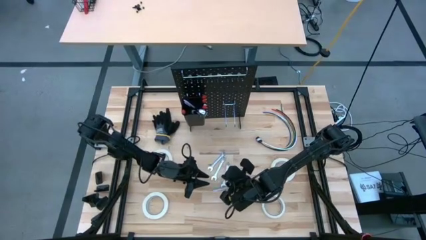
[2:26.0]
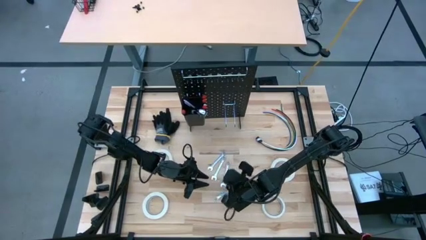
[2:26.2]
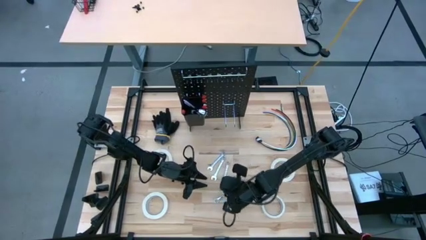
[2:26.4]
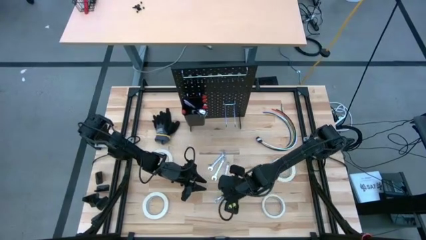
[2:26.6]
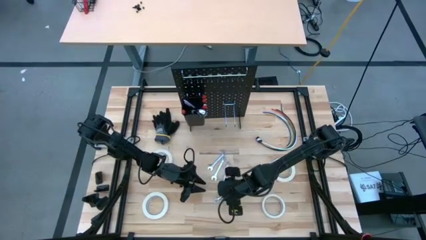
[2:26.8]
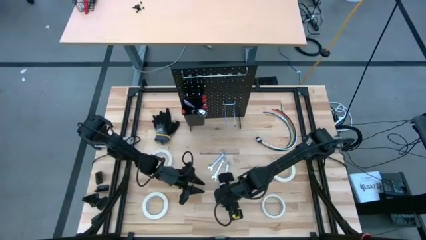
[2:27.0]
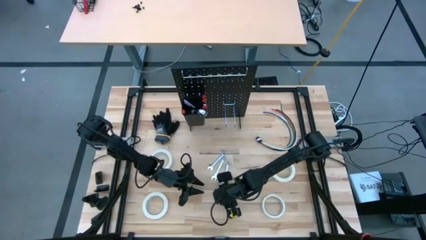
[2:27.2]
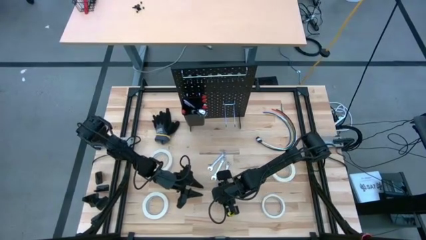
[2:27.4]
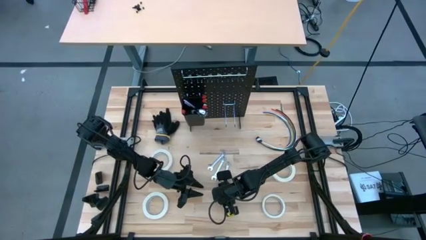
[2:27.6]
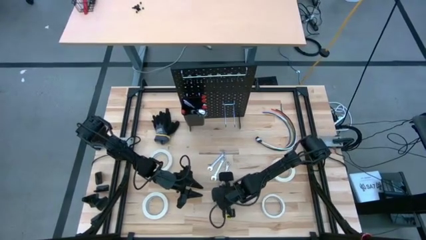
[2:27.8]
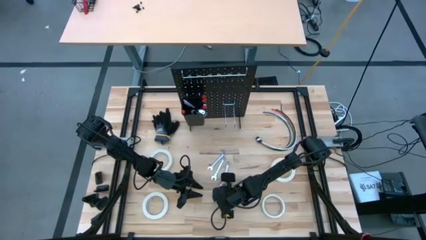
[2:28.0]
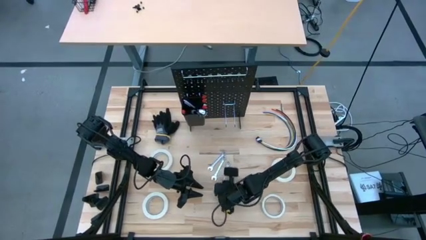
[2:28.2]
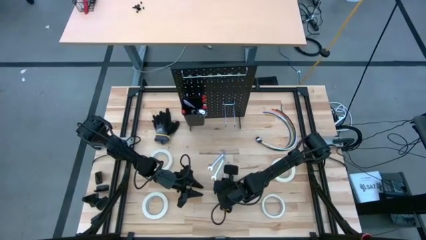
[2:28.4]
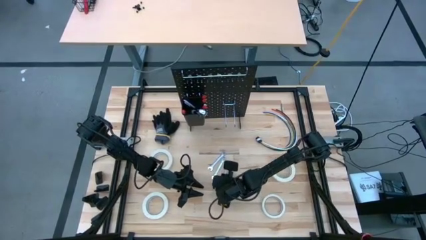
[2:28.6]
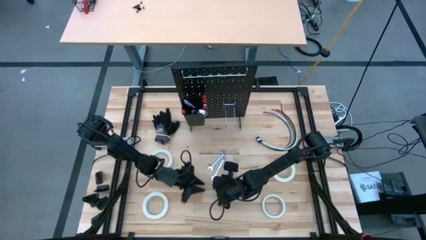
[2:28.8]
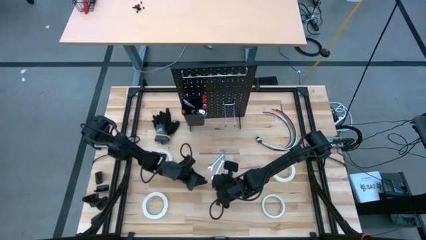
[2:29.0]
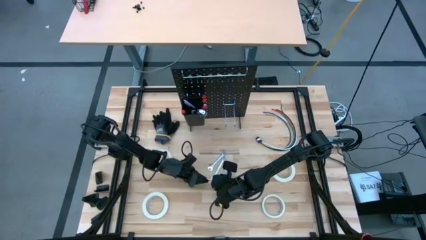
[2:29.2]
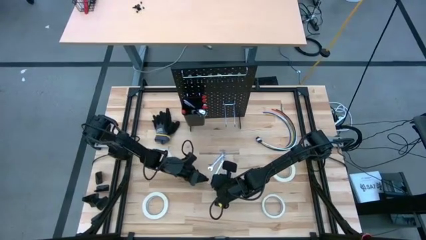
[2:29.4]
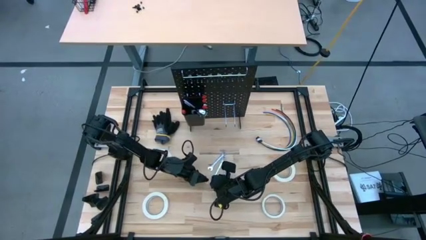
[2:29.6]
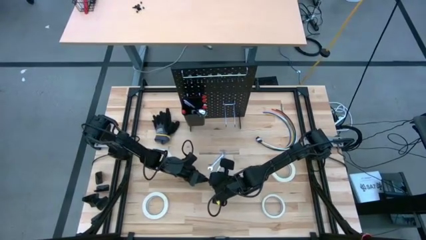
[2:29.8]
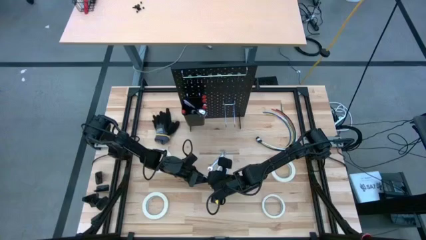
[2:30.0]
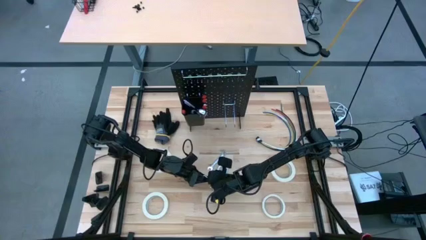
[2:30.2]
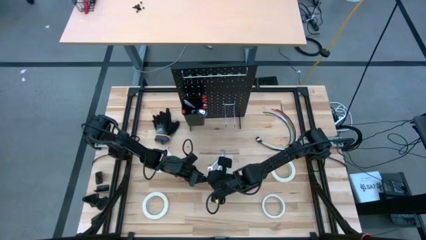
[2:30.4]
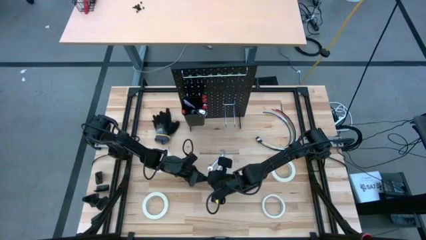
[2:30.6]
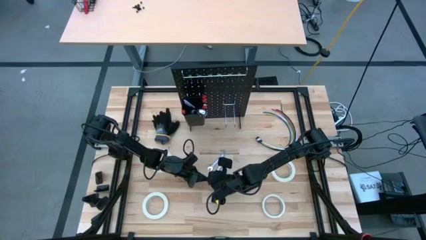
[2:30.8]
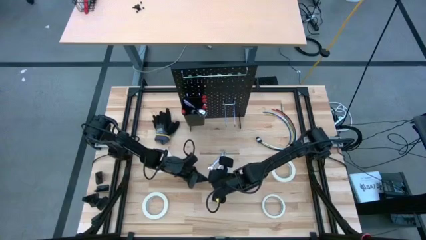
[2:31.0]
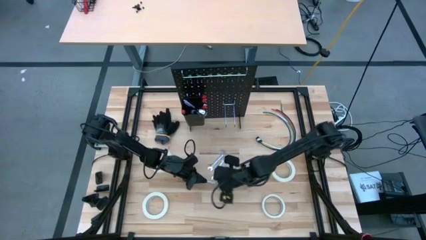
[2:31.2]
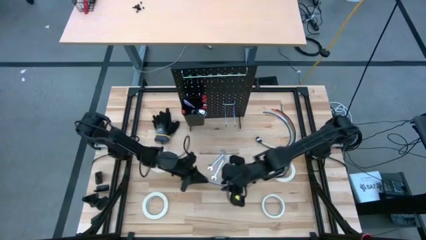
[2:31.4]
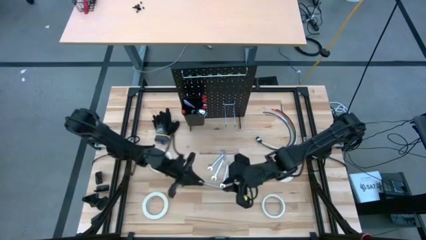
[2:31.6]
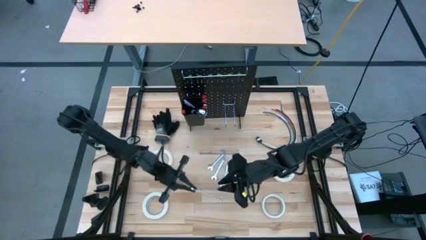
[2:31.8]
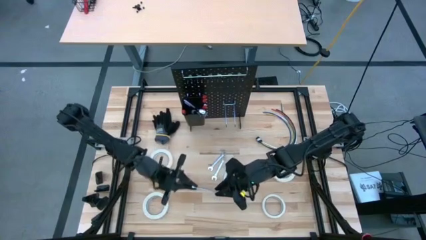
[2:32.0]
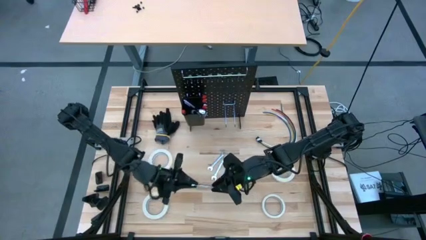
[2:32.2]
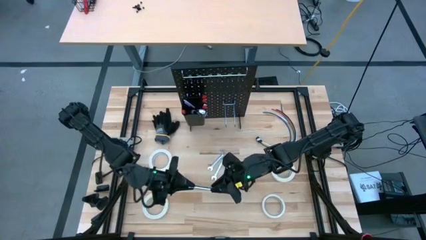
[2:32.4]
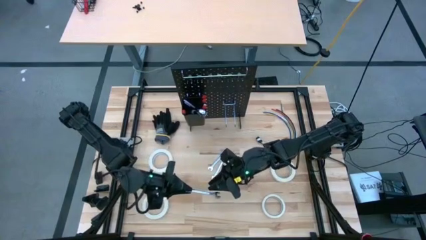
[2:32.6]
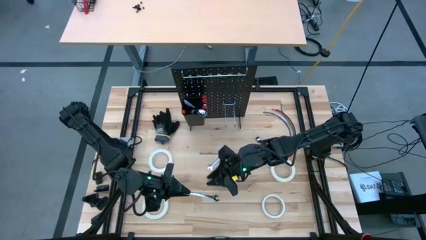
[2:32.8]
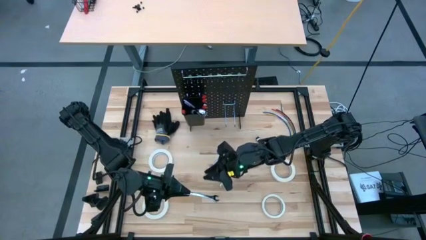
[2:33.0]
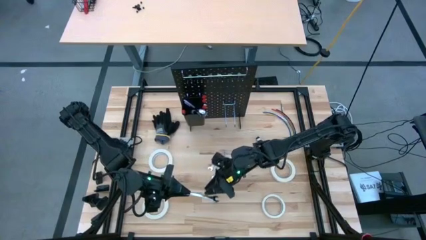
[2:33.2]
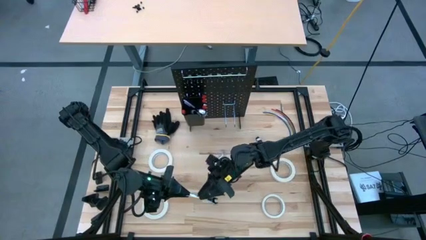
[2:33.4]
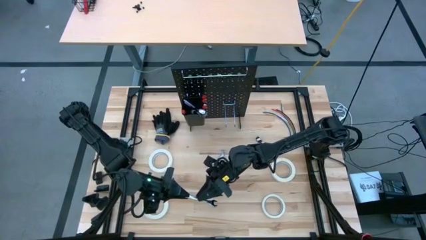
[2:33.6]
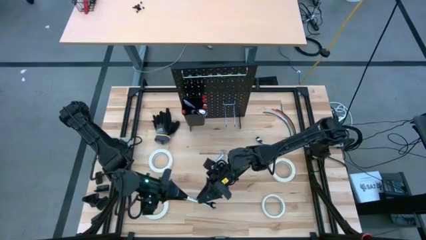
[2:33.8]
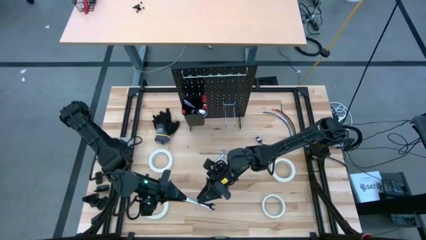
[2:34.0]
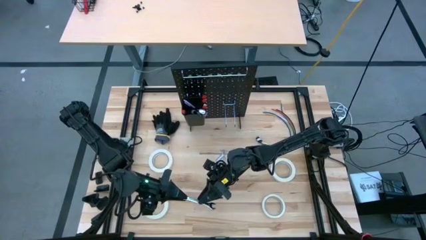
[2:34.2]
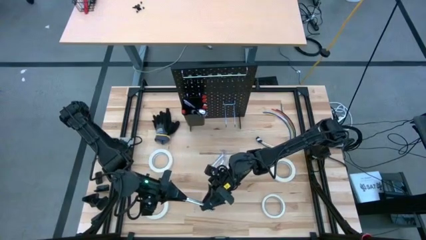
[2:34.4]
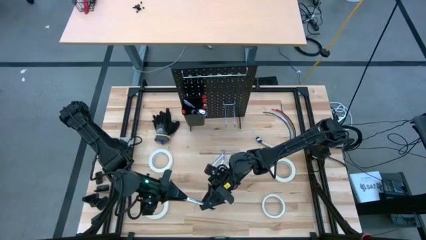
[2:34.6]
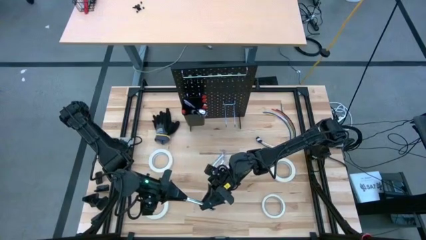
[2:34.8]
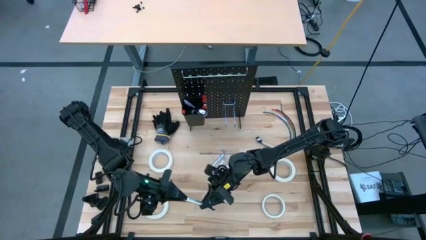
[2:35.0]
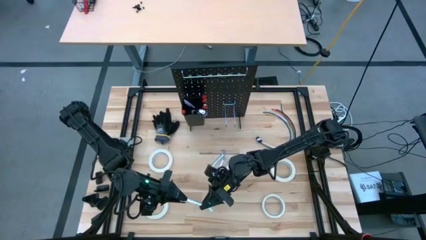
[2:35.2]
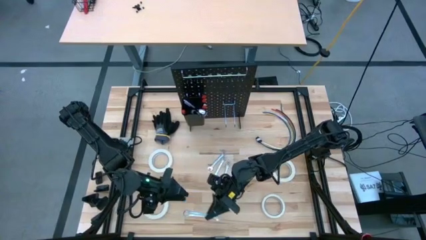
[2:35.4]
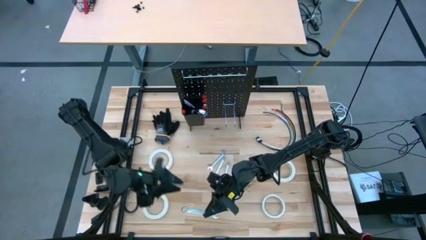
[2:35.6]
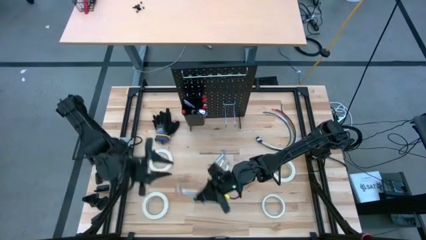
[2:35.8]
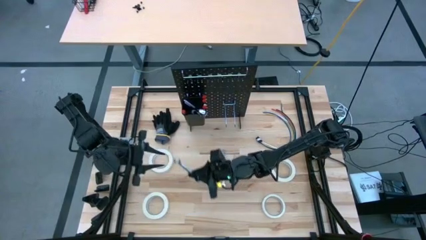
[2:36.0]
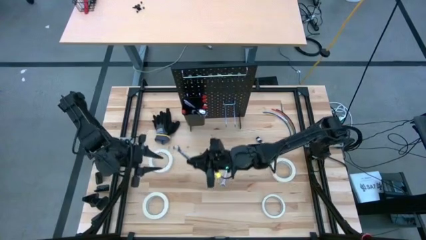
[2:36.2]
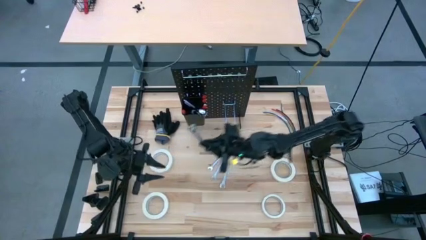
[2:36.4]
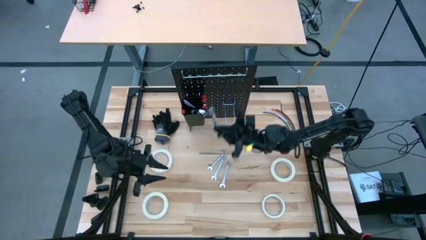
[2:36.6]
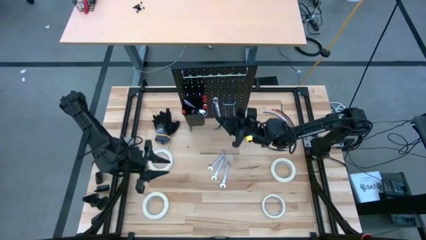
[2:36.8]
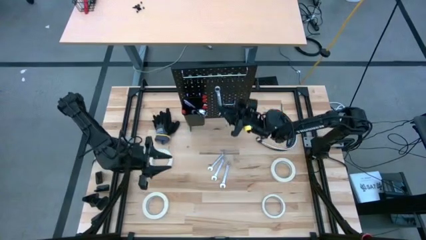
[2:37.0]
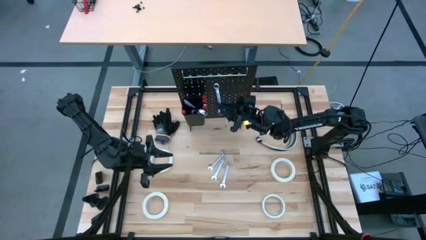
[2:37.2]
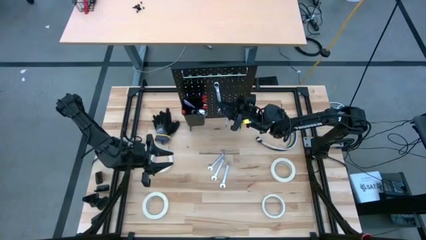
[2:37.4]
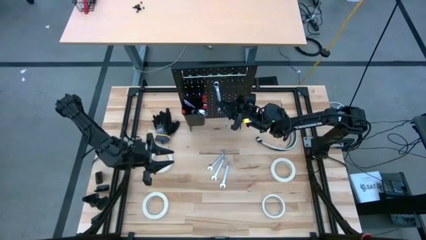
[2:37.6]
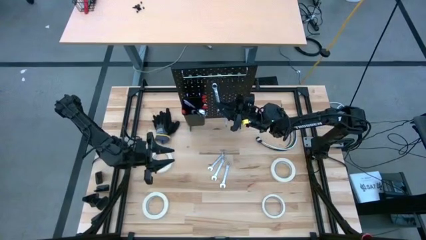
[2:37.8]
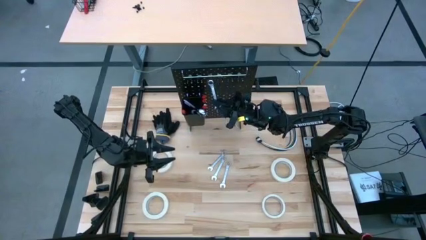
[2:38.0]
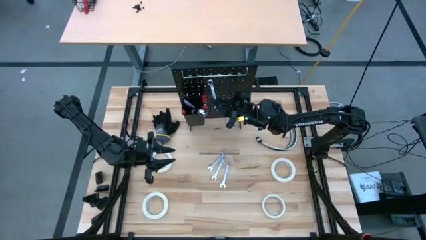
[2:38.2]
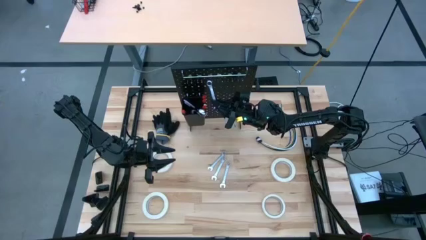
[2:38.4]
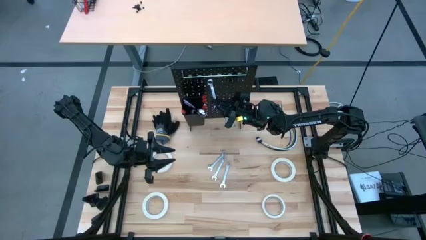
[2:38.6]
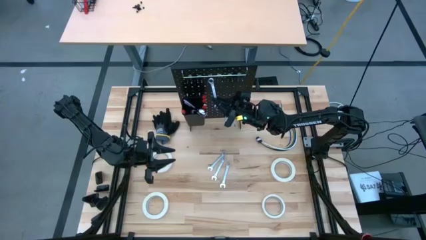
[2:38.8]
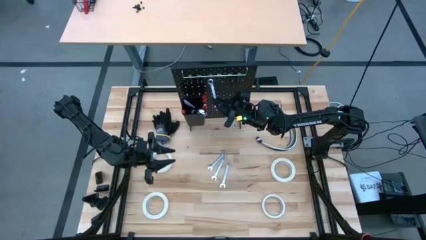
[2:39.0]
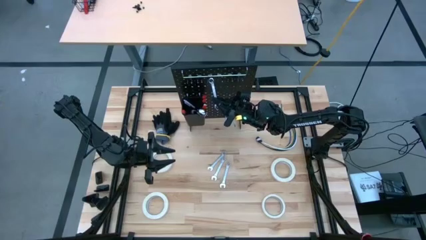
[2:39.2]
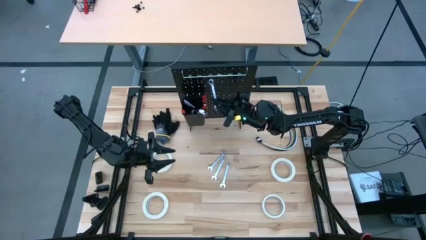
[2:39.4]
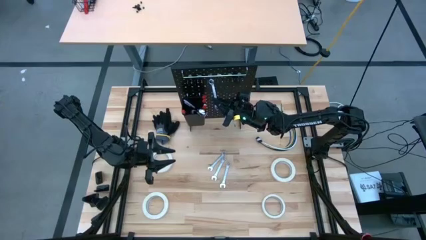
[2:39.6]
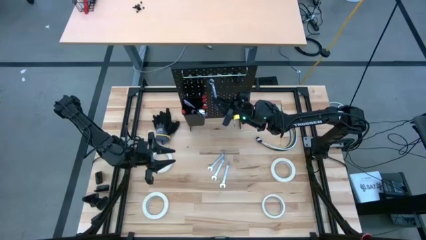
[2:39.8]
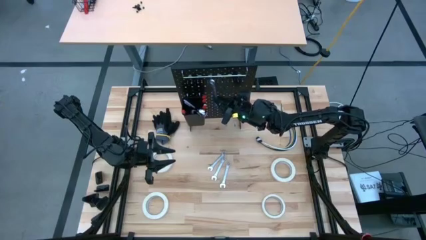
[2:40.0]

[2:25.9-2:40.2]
Task: Hang tools onto peg board
Hang the wrench on the peg board
